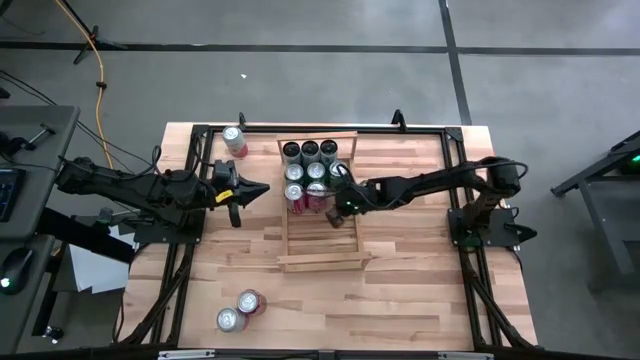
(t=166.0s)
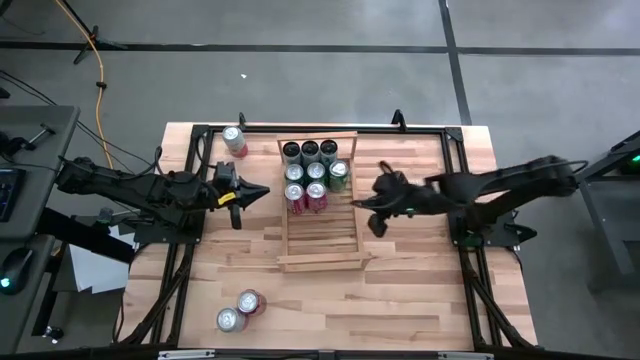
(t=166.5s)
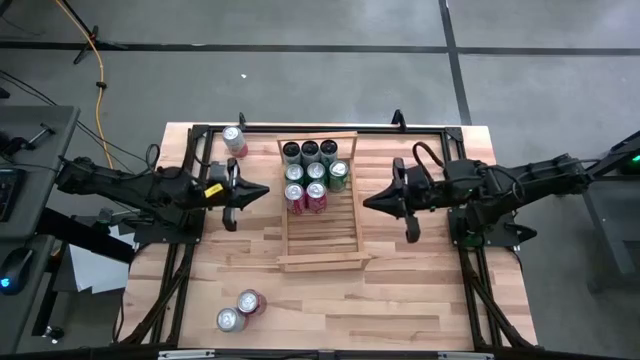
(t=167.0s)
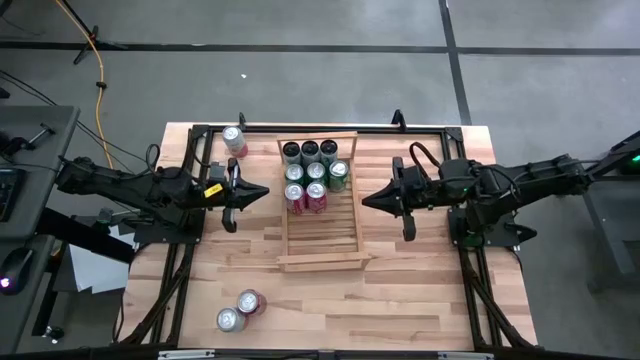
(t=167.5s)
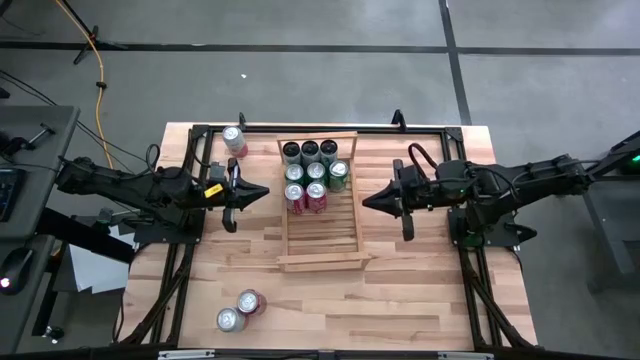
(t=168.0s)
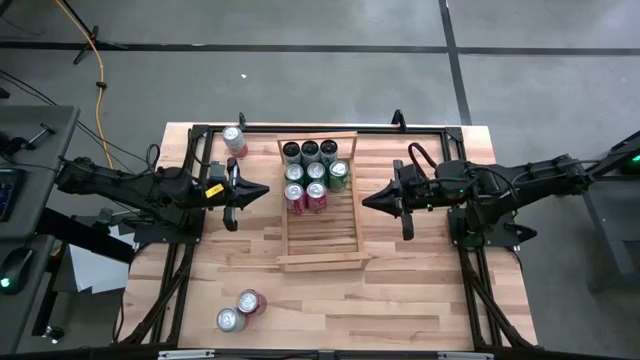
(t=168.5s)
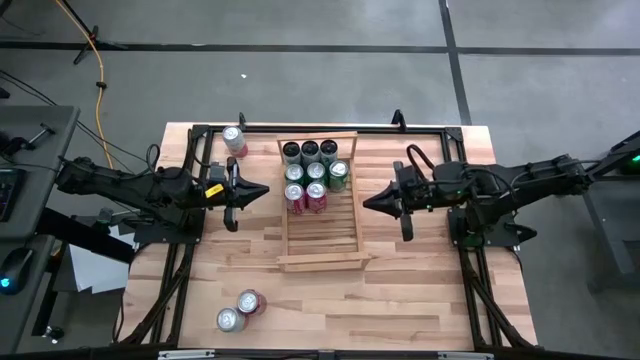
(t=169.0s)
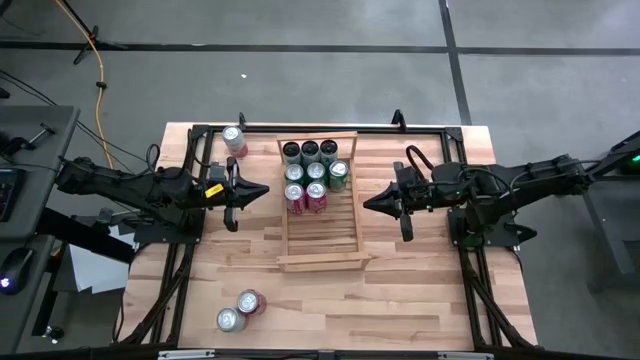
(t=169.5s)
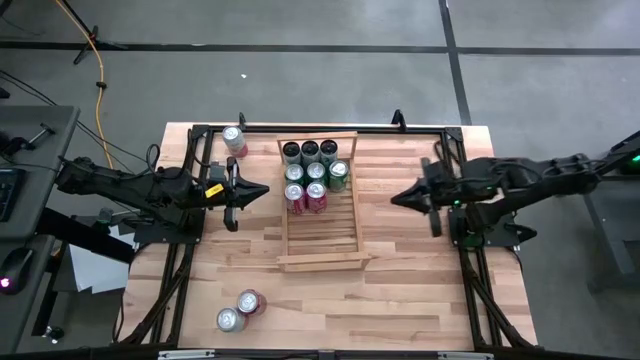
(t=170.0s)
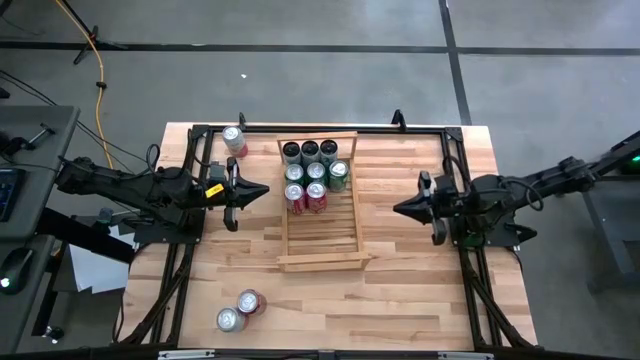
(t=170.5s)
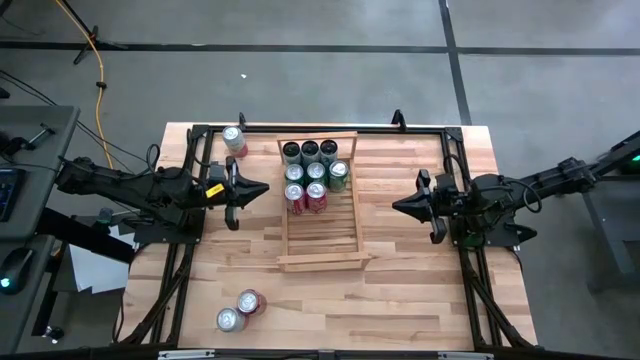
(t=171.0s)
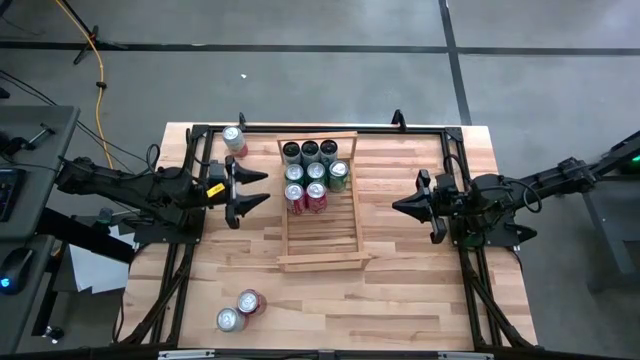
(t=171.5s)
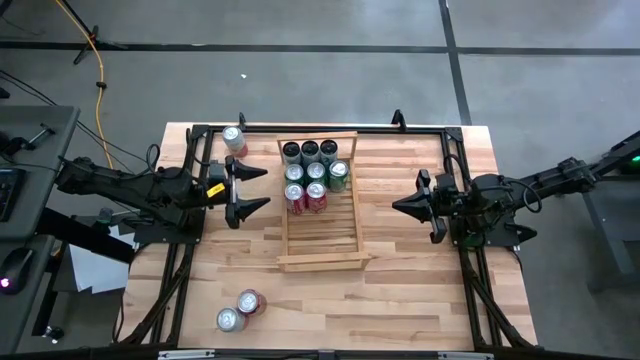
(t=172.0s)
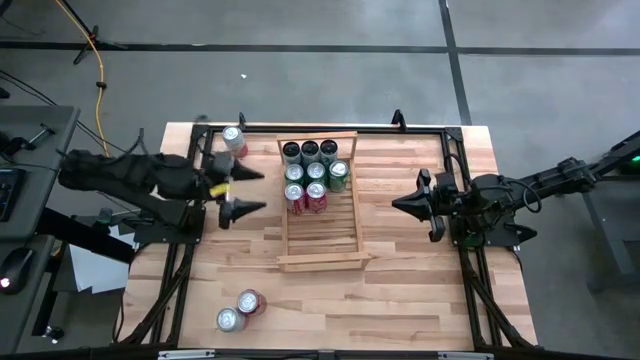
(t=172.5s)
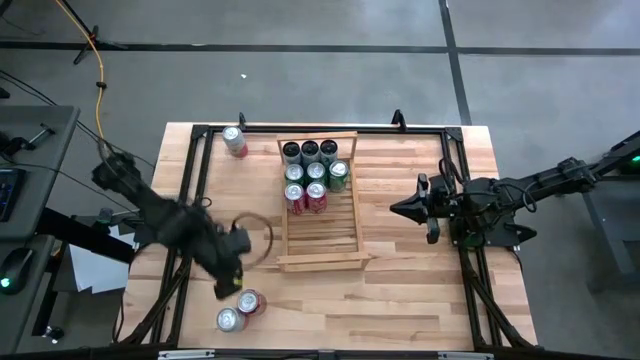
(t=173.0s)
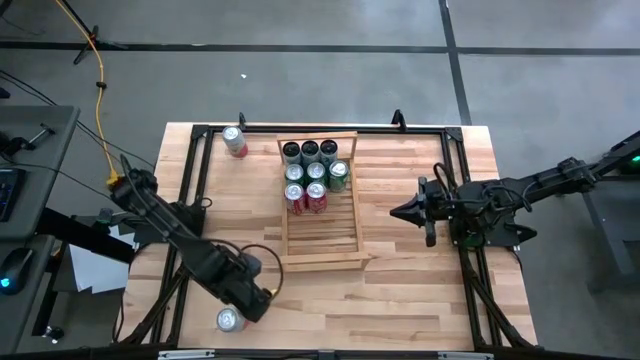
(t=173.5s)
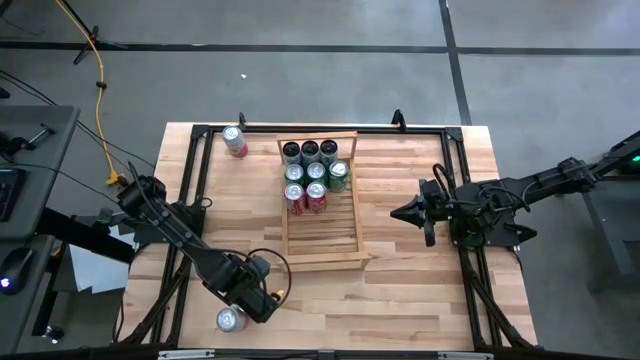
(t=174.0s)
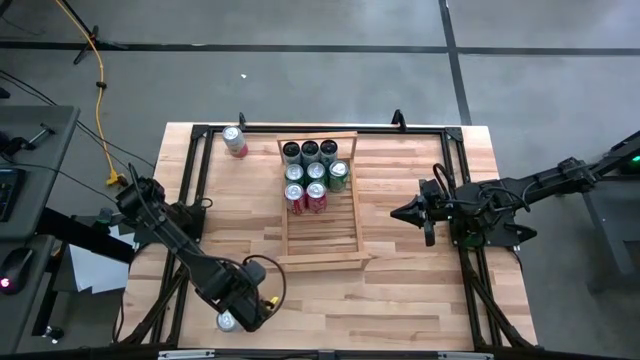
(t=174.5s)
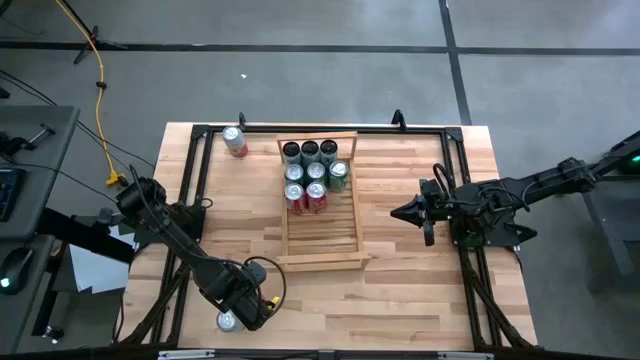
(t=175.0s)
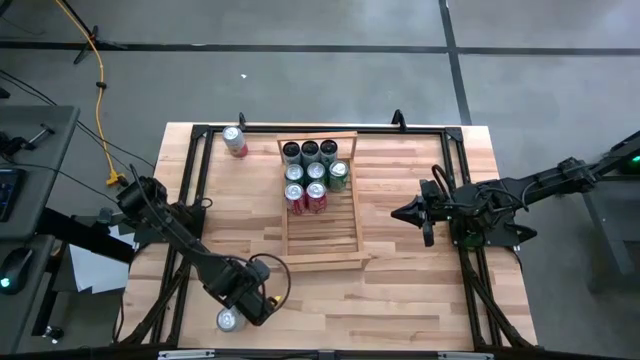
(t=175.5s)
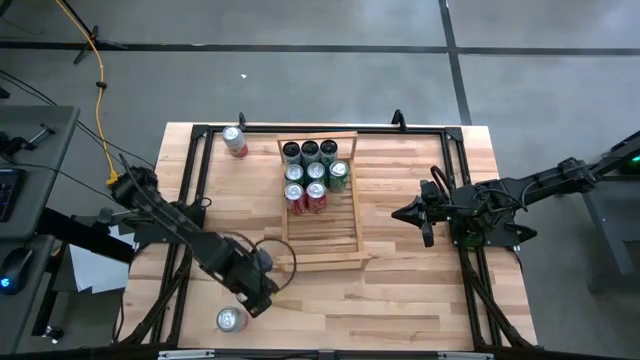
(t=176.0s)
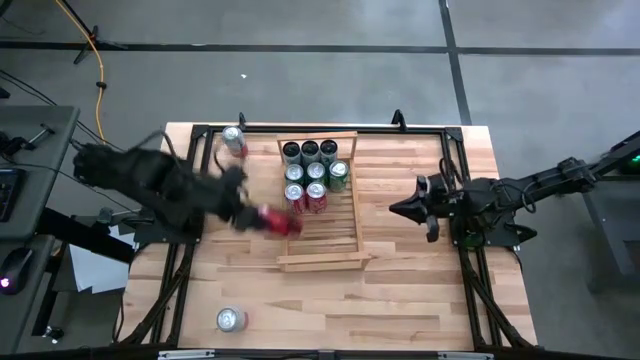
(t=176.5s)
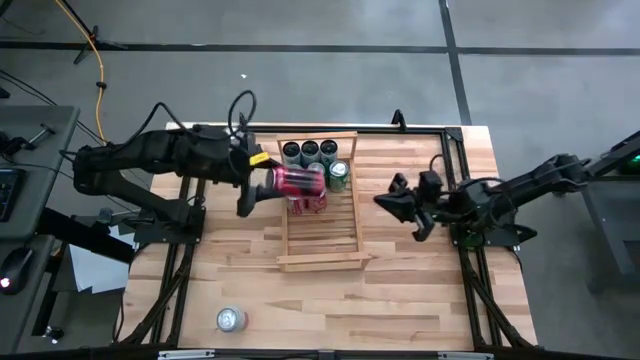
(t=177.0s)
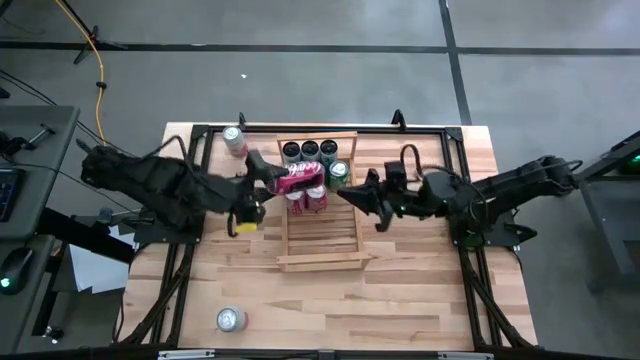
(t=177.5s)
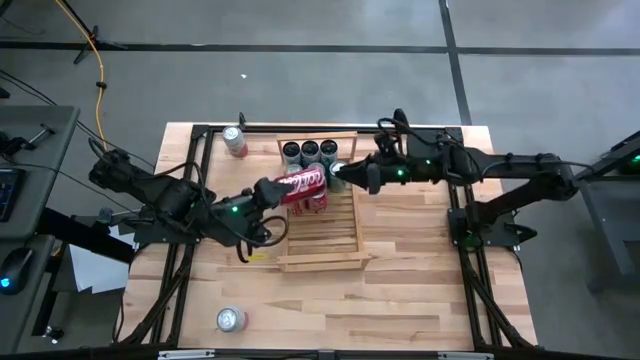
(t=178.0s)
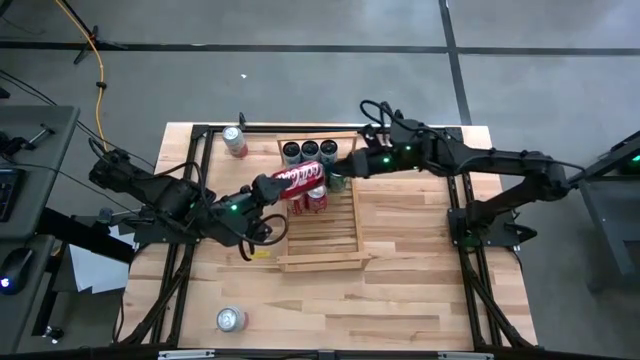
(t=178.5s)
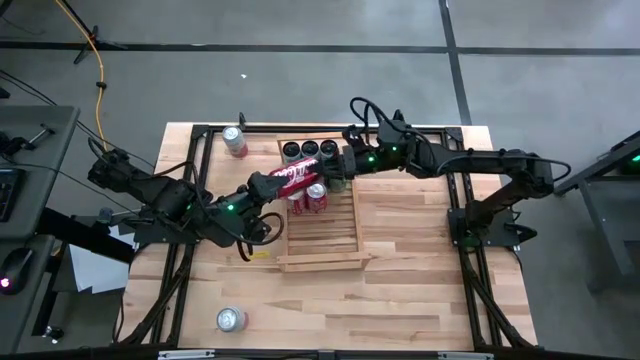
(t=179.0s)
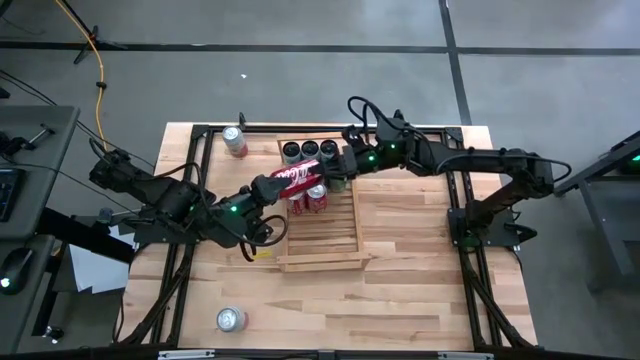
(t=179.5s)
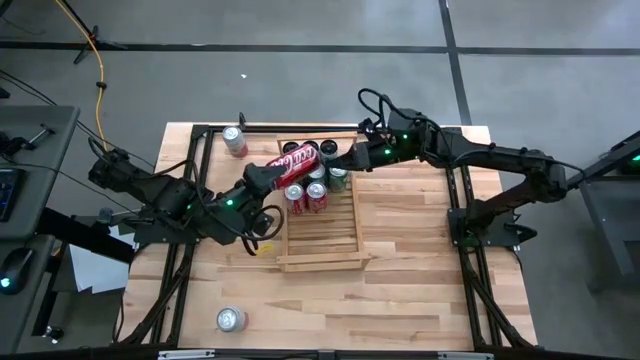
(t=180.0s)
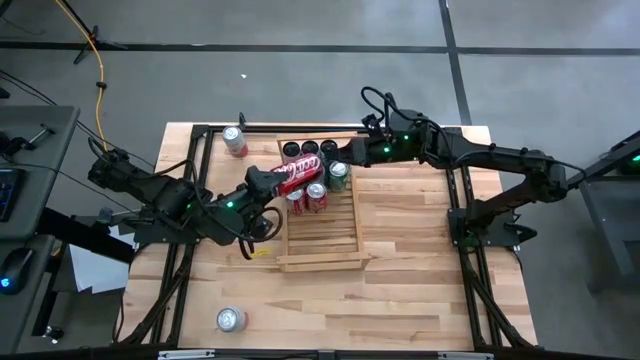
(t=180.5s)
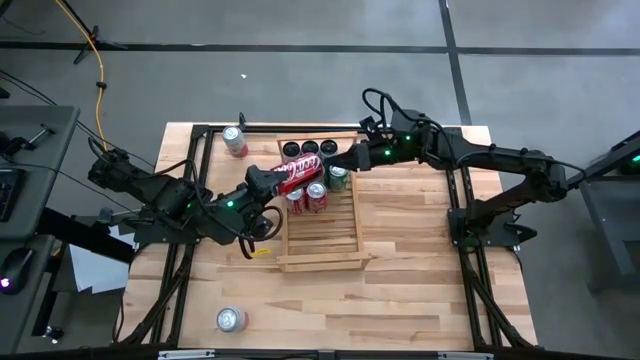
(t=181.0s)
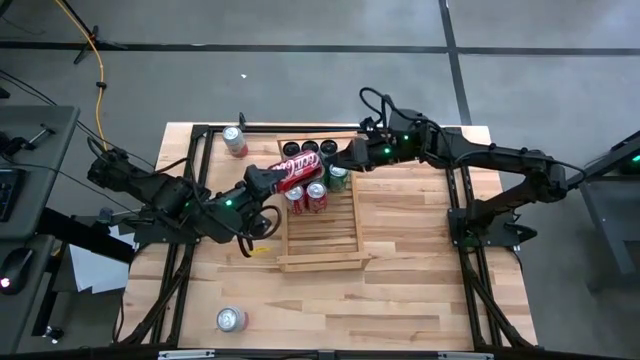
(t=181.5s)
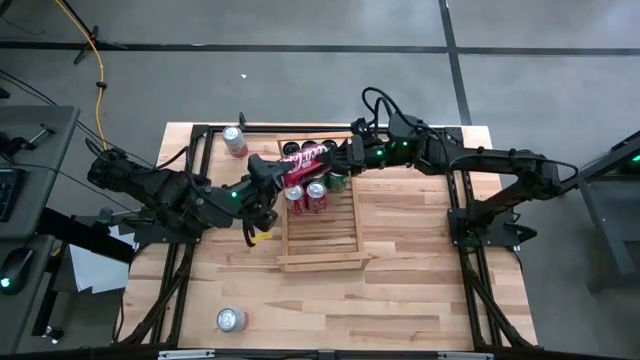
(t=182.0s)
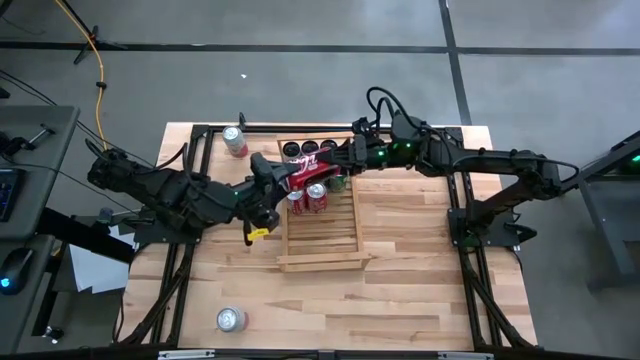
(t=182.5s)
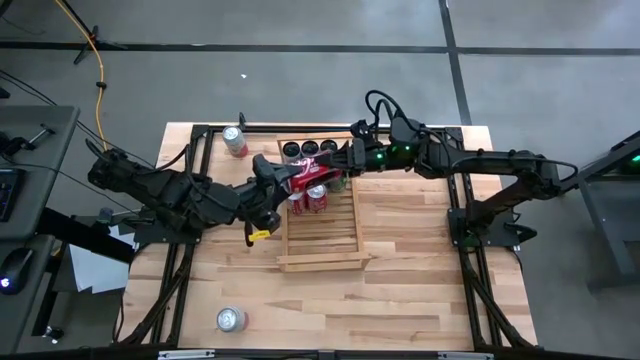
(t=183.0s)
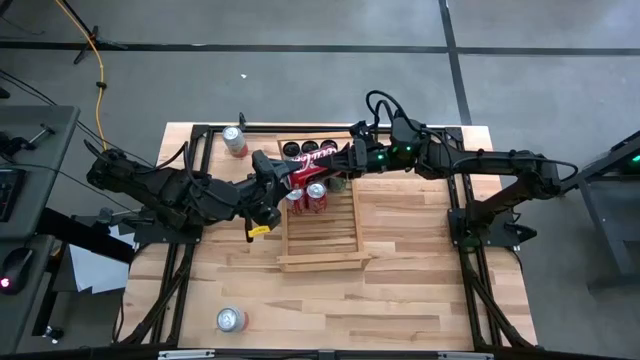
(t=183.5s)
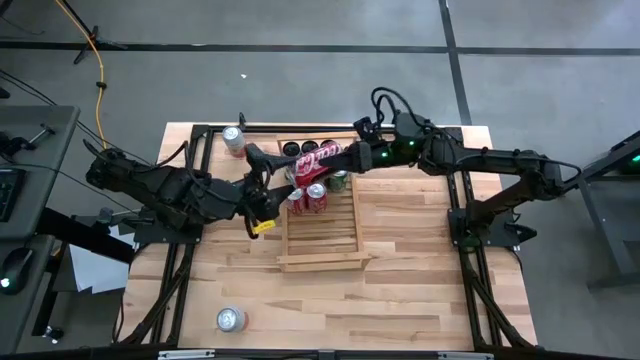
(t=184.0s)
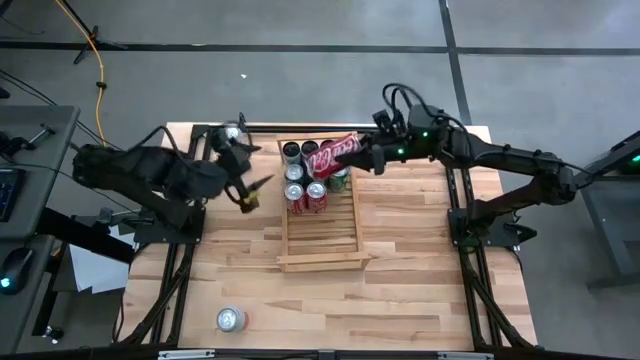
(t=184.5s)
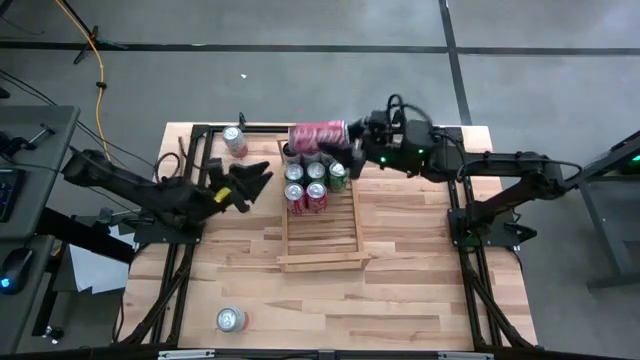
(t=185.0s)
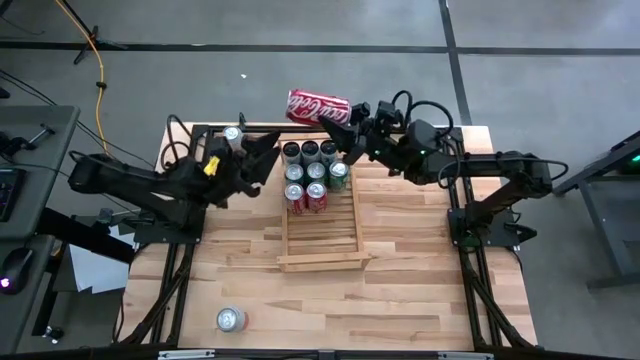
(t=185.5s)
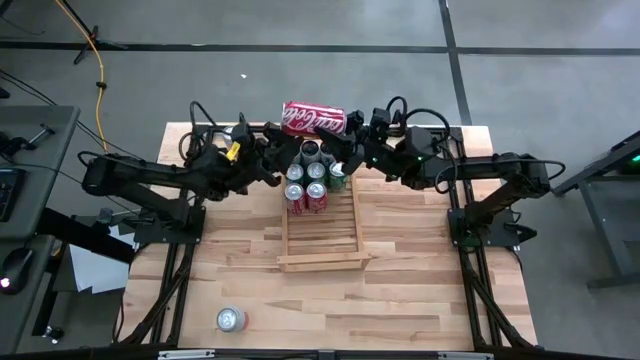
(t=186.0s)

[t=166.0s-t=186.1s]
Task: Place canned beverage on shelf
Put the red can on the shelf aligned with the other red cans

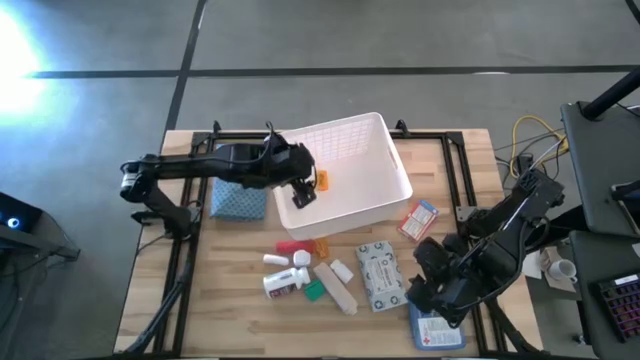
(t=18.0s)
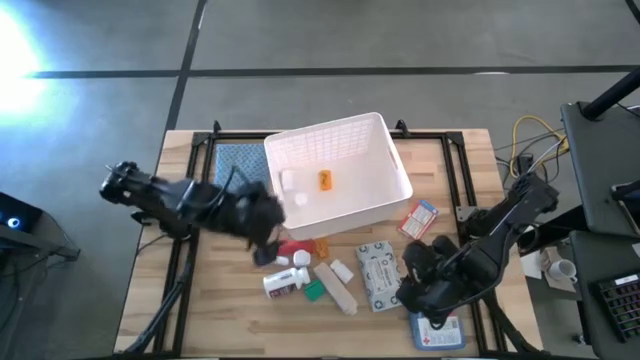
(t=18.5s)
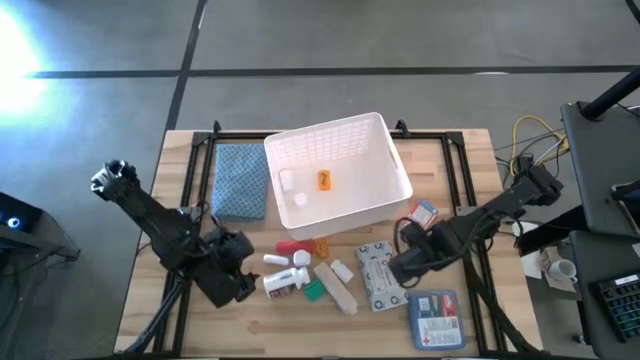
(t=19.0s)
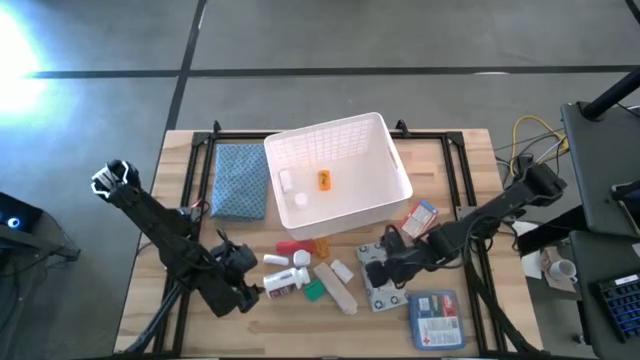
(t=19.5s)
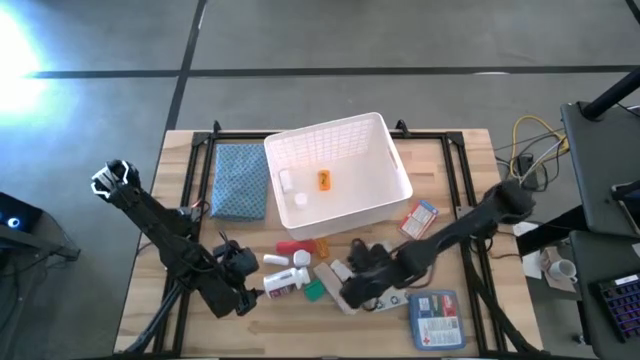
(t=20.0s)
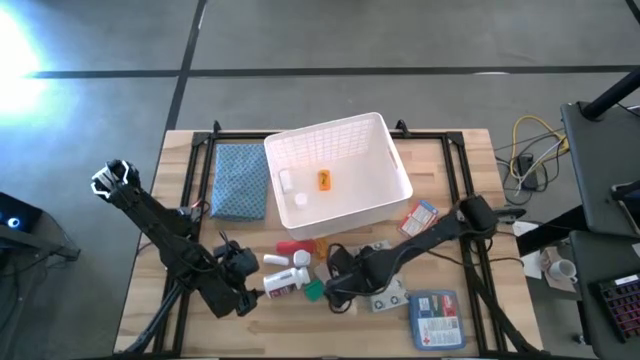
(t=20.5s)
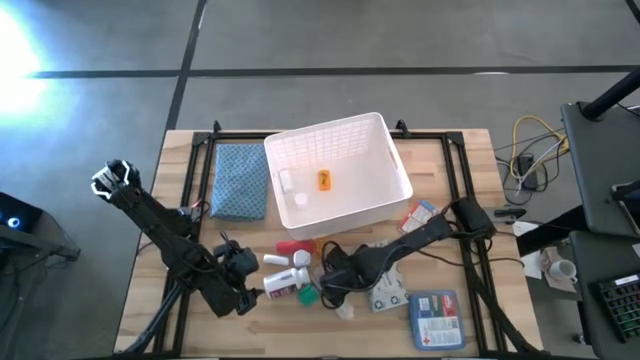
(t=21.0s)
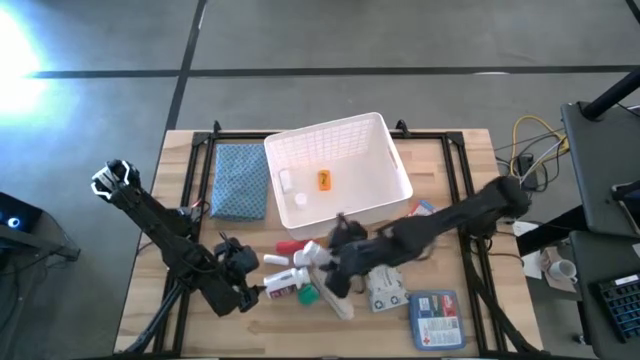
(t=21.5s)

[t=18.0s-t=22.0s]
Task: Pick & place medical supplies in basket/bin
Put the white pill bottle into the white bin
